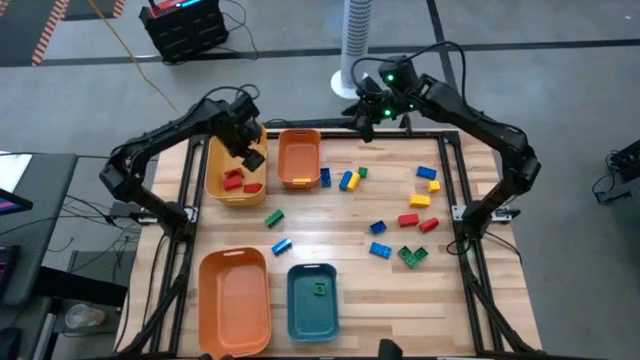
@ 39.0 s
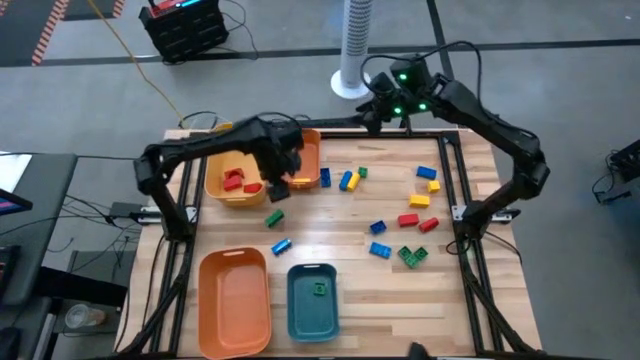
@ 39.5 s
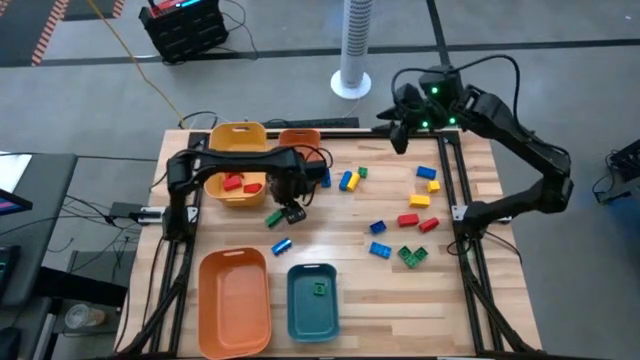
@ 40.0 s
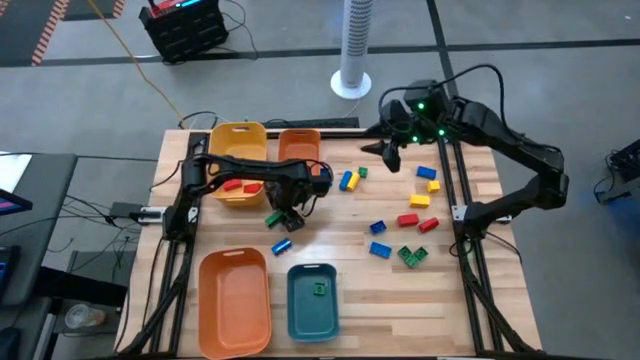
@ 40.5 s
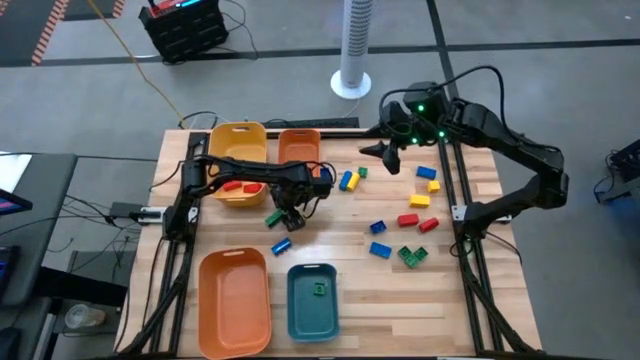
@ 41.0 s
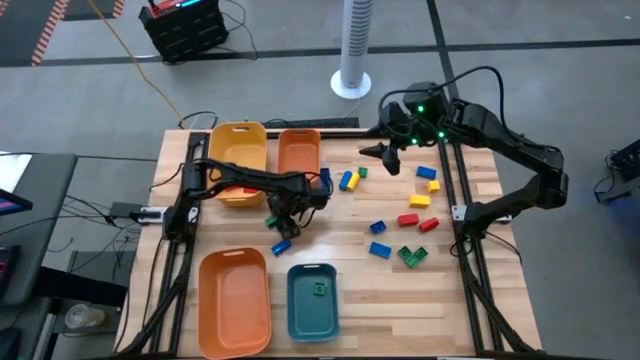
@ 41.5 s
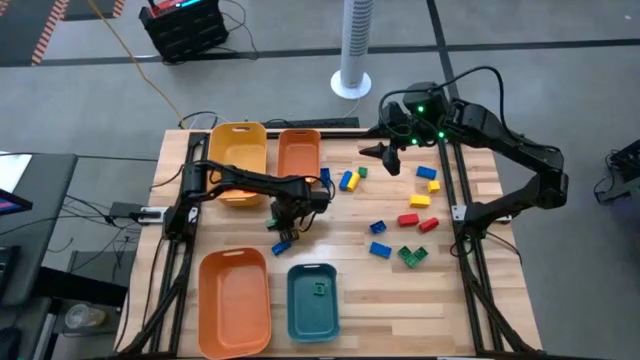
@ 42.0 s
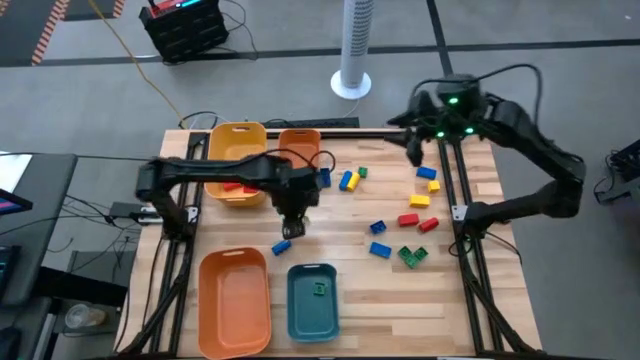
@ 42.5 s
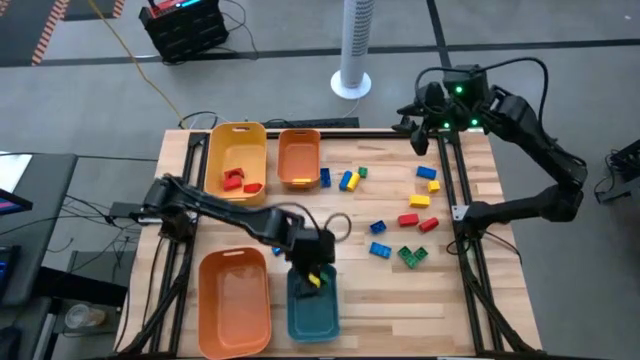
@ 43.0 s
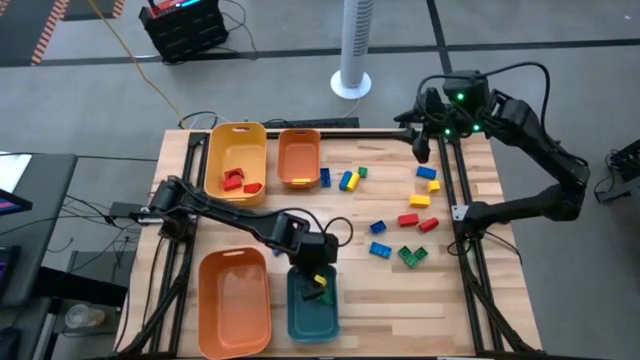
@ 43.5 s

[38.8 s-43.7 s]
Task: Sort blocks
Put the green game piece into the blue bin

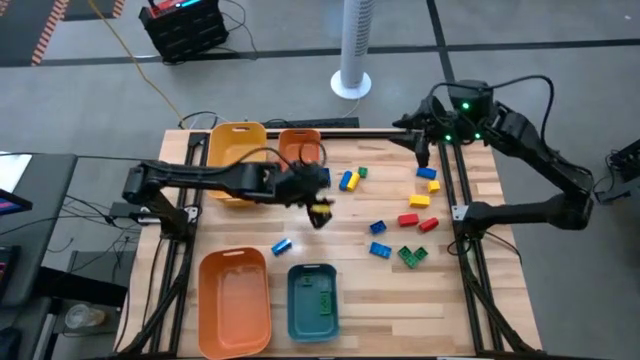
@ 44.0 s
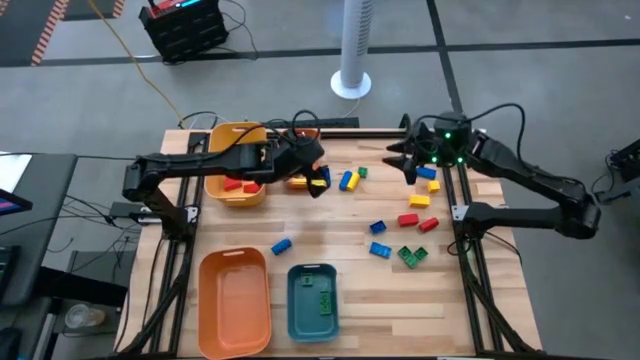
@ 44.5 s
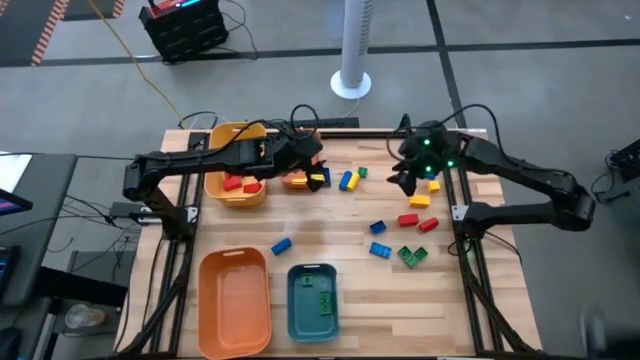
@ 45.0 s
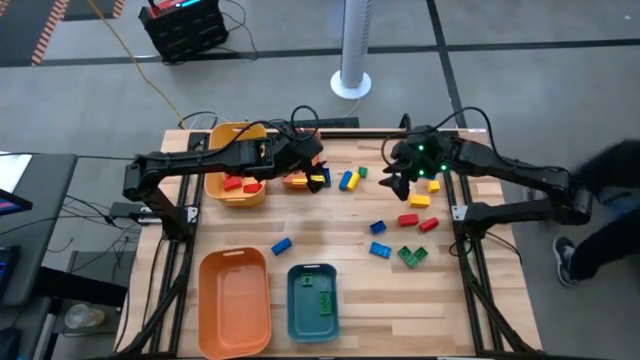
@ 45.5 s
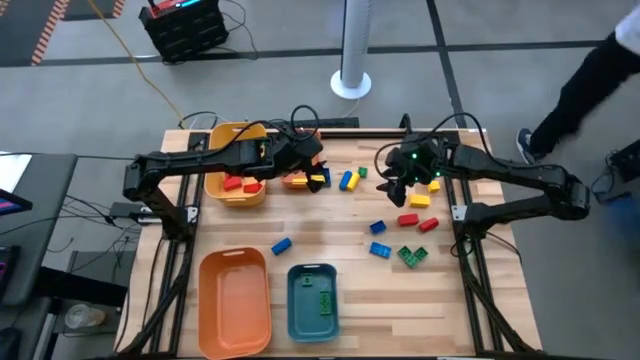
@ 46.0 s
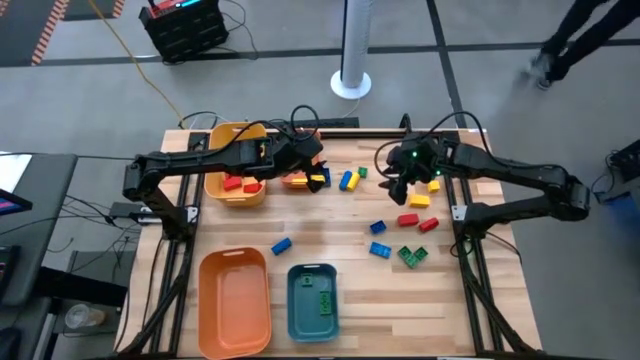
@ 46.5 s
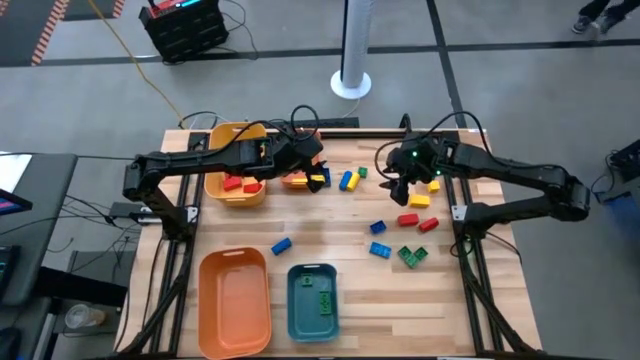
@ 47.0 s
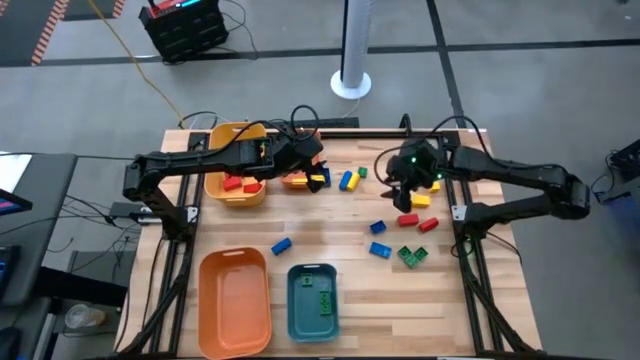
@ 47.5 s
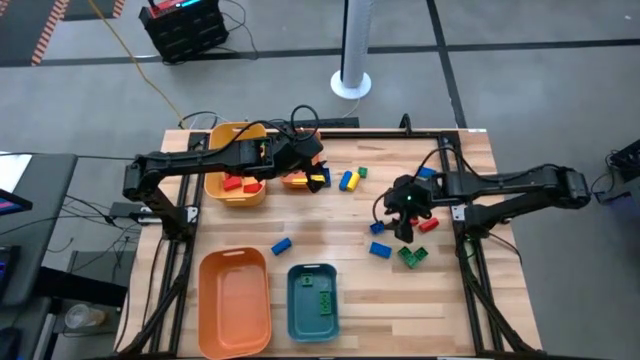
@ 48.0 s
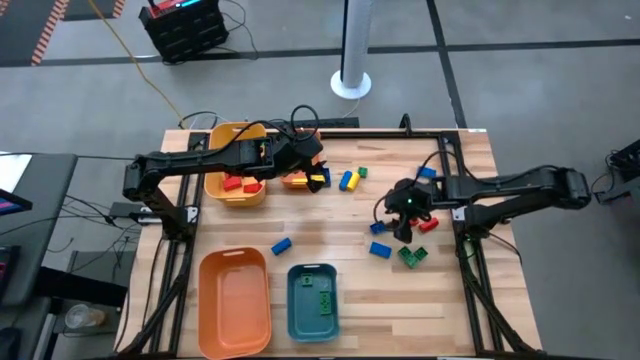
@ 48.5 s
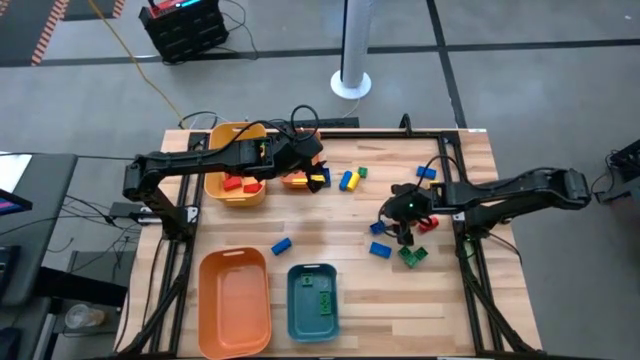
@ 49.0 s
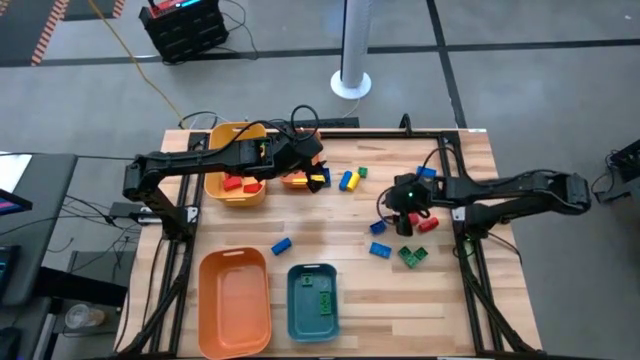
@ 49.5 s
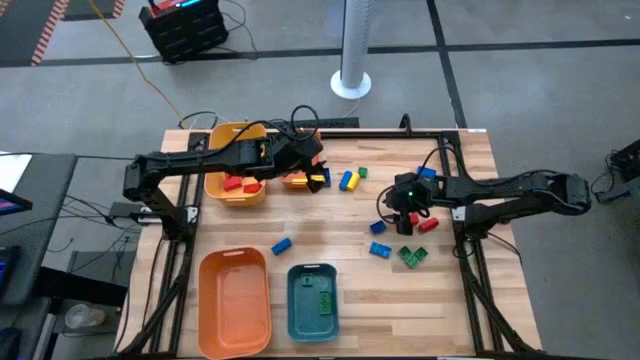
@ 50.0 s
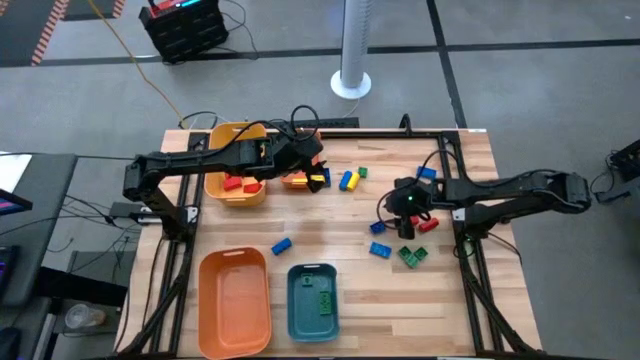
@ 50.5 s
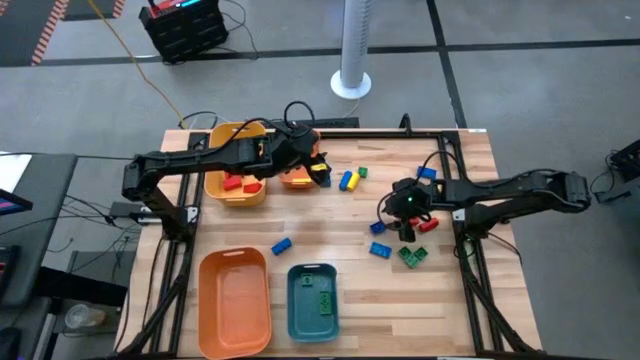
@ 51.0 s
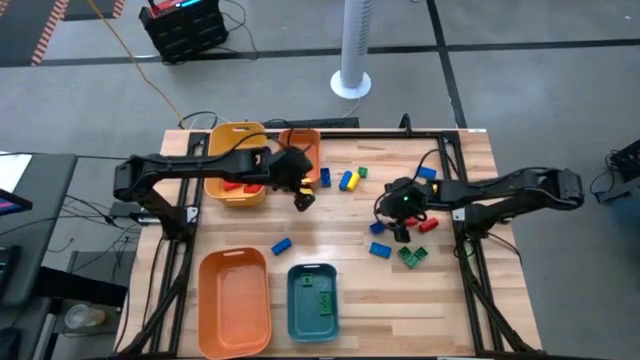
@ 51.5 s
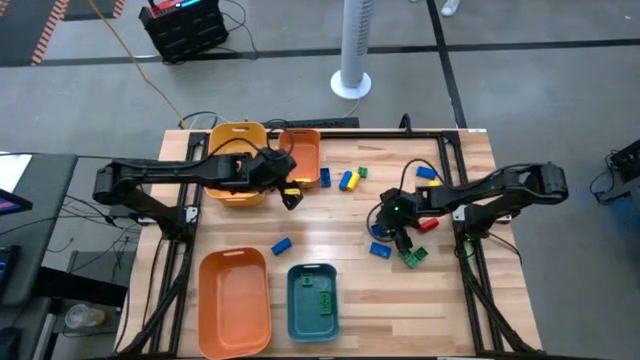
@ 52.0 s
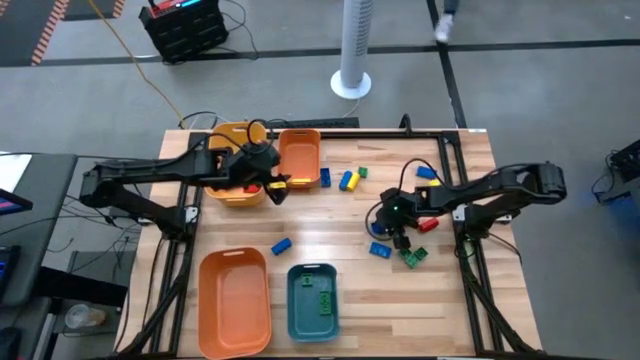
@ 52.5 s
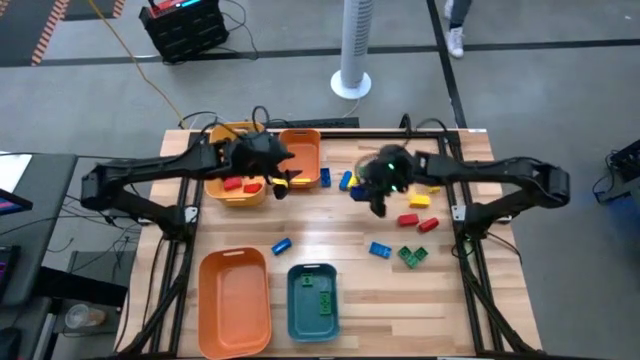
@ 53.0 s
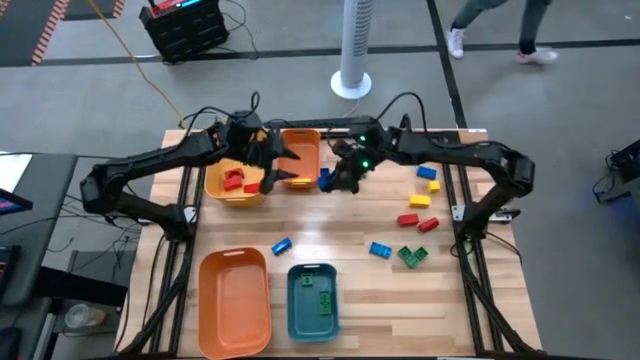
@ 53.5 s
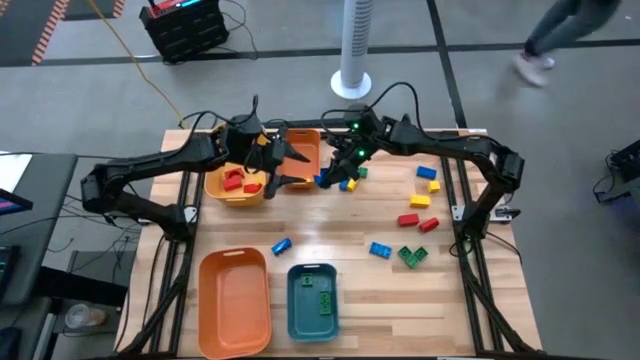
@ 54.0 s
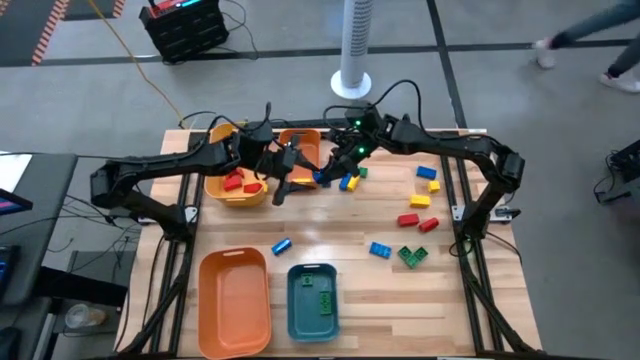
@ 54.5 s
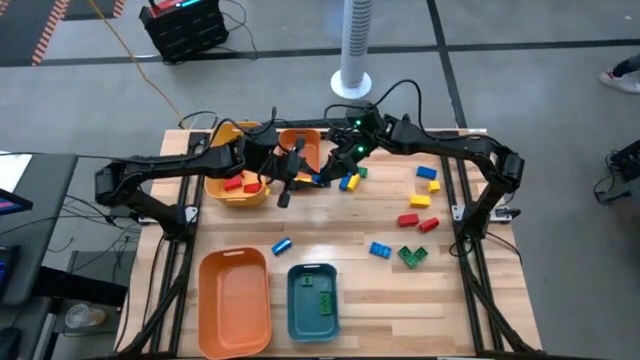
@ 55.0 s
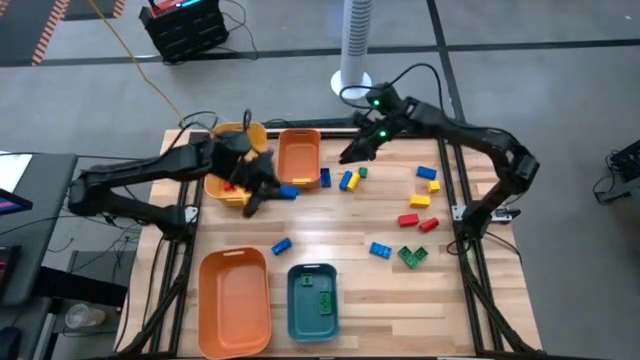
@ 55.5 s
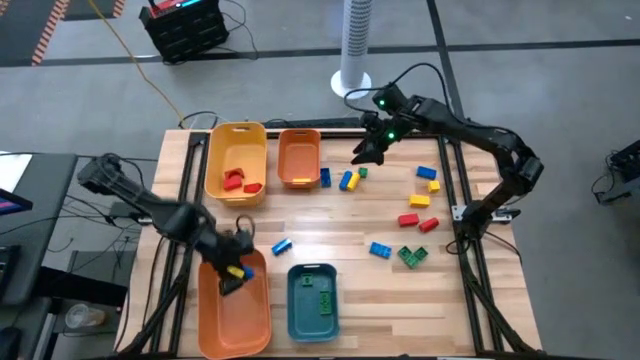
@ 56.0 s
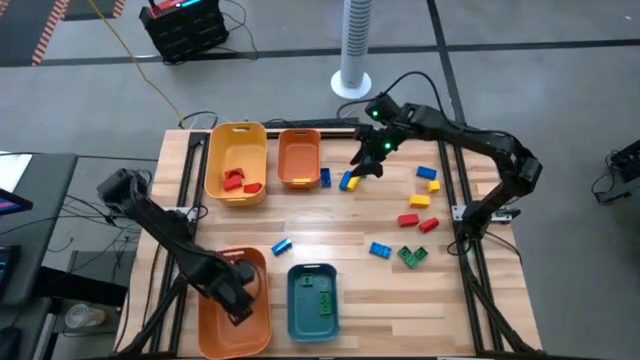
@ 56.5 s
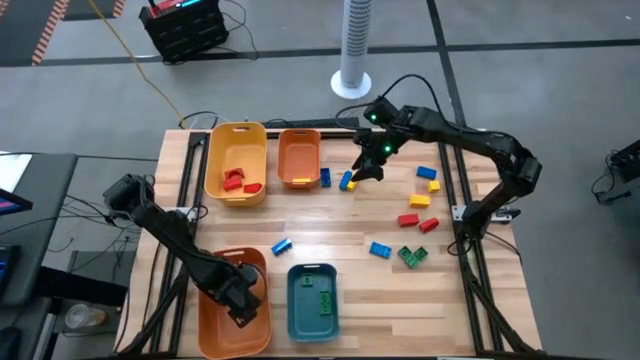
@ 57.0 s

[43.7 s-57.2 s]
Put the blue game piece into the large orange bin

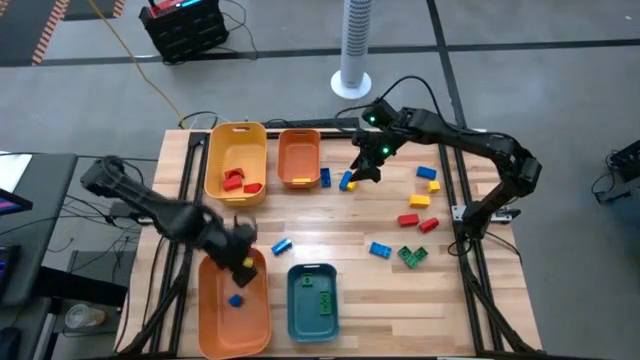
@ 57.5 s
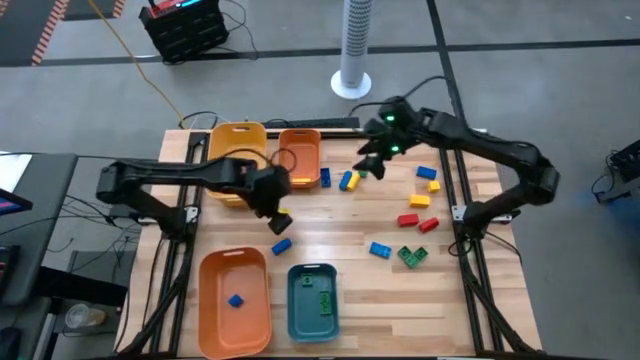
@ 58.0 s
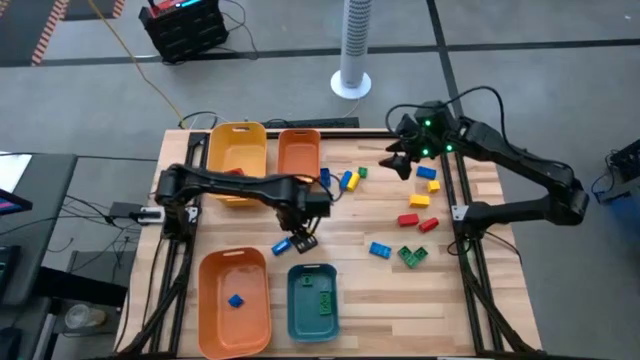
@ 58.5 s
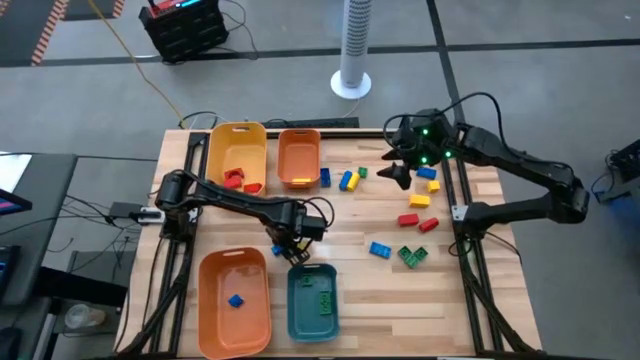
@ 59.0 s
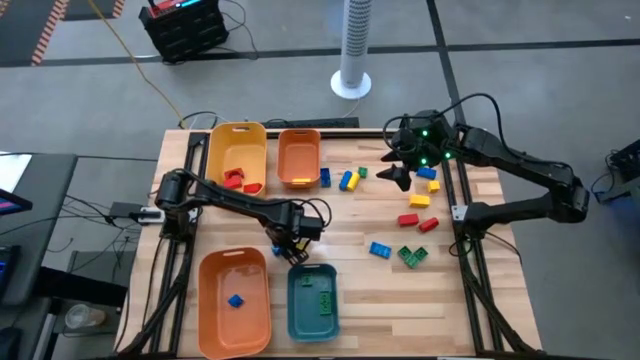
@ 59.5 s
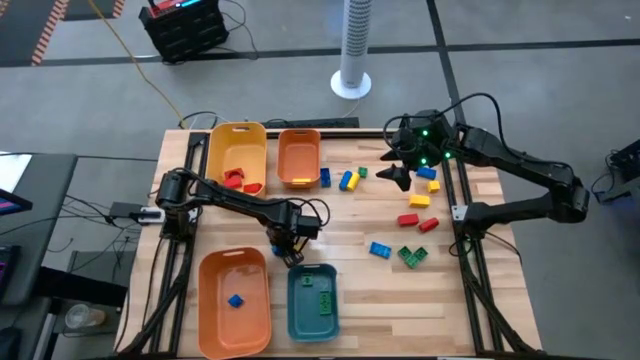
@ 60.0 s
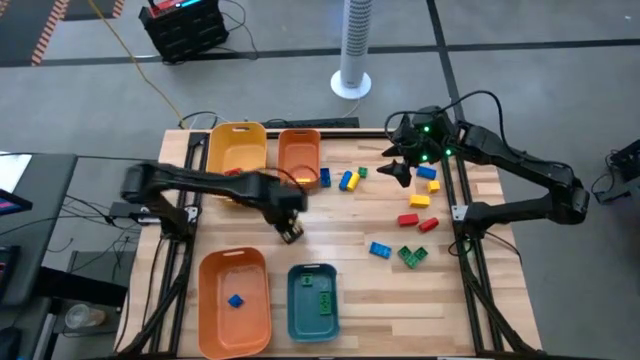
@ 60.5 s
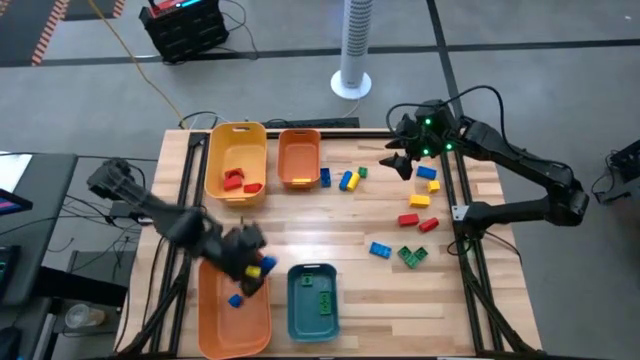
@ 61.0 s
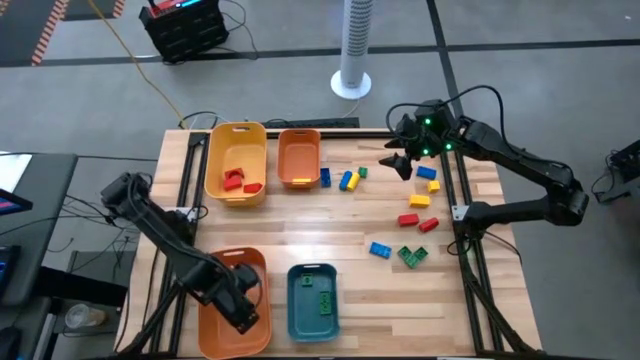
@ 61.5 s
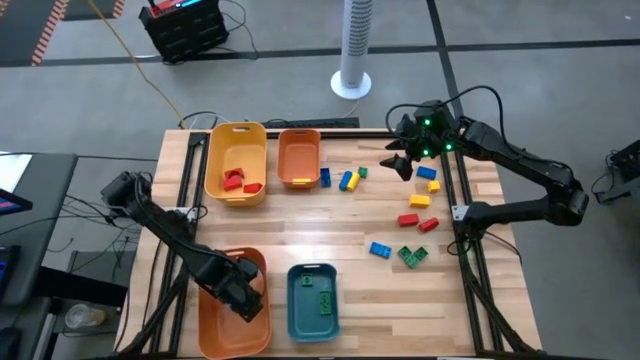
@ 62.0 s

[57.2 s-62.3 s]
Put the blue game piece into the large orange bin
